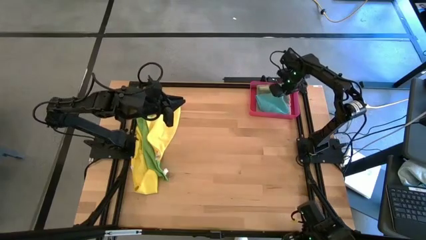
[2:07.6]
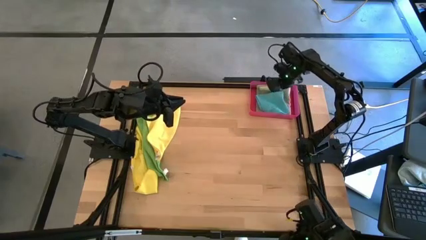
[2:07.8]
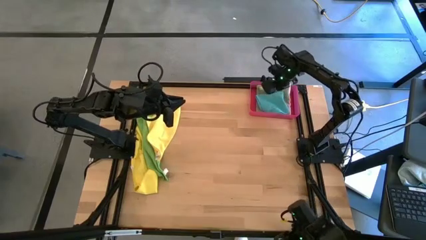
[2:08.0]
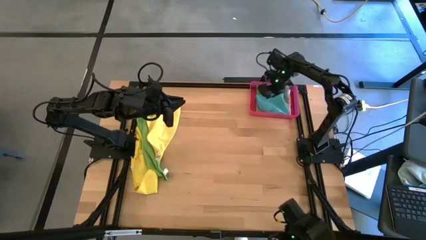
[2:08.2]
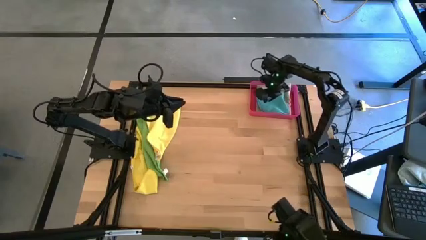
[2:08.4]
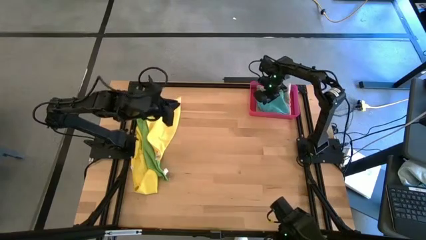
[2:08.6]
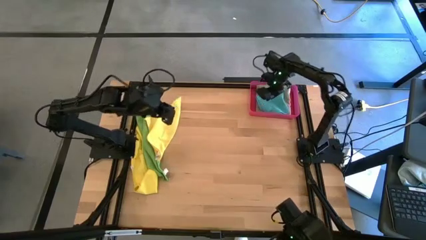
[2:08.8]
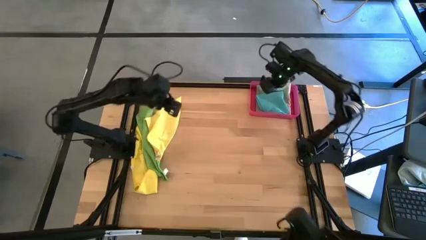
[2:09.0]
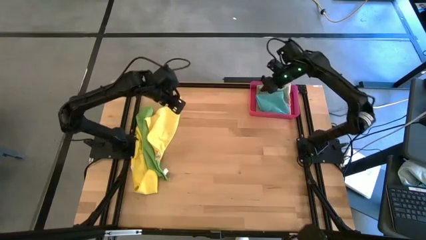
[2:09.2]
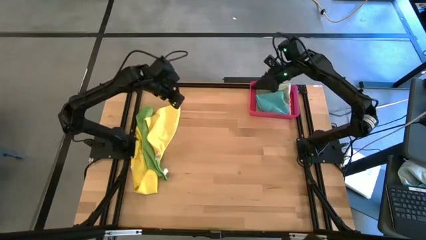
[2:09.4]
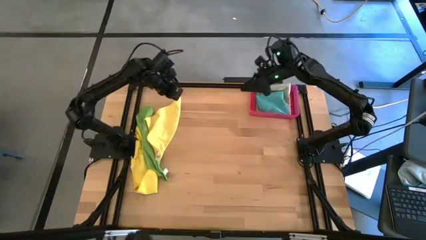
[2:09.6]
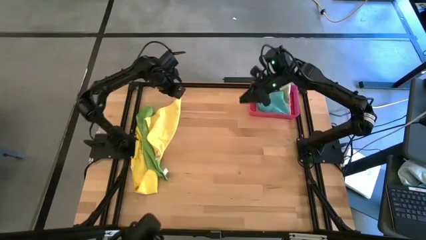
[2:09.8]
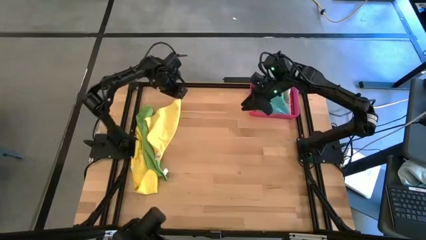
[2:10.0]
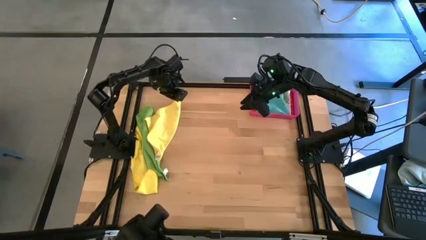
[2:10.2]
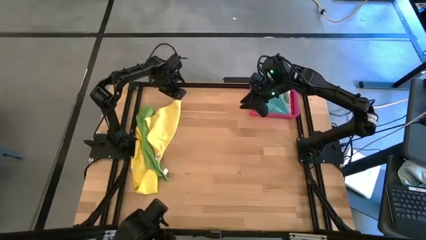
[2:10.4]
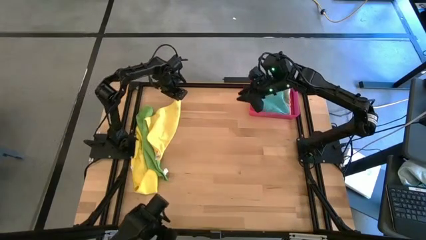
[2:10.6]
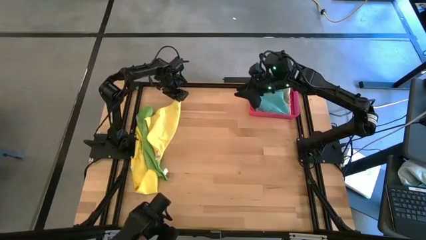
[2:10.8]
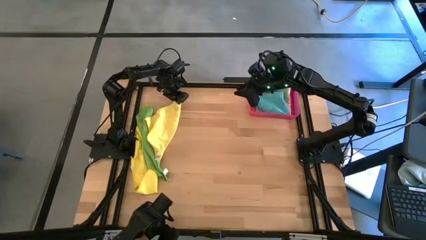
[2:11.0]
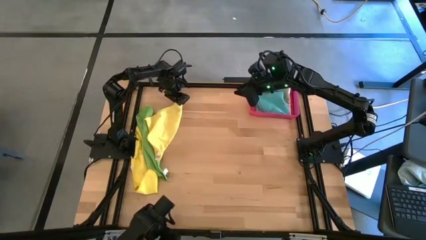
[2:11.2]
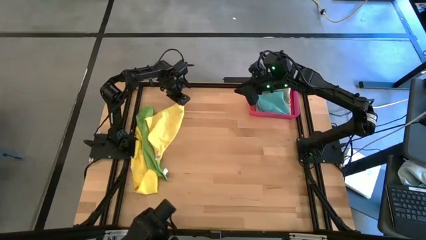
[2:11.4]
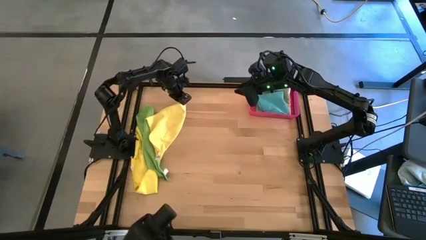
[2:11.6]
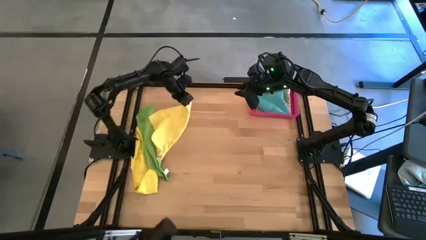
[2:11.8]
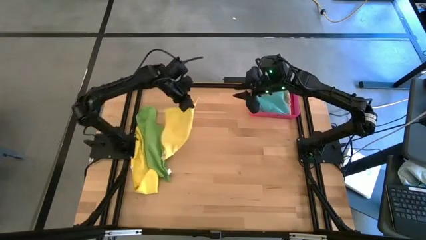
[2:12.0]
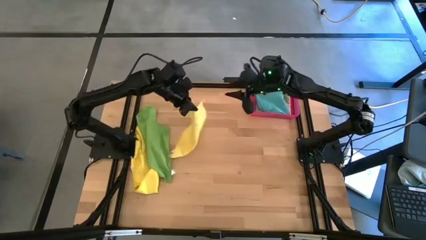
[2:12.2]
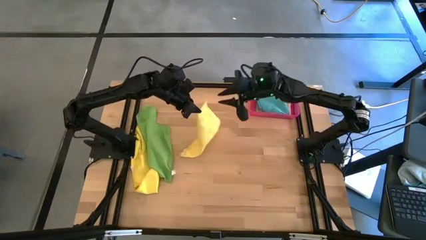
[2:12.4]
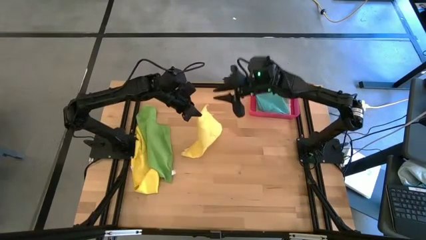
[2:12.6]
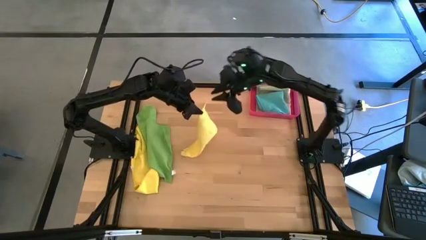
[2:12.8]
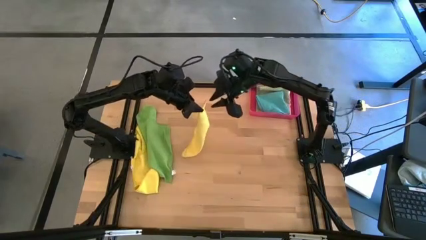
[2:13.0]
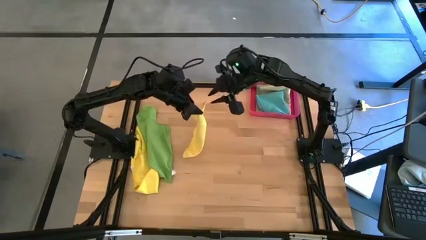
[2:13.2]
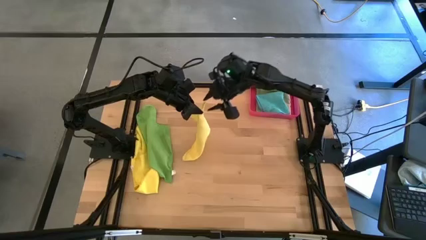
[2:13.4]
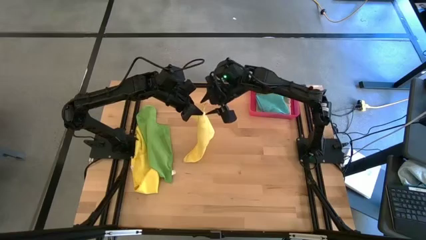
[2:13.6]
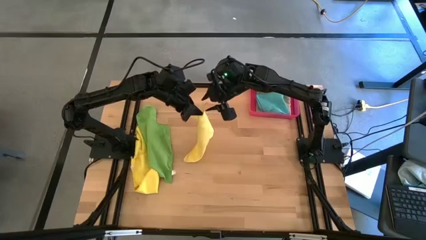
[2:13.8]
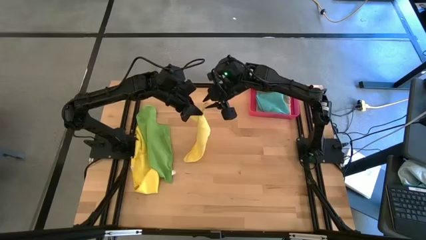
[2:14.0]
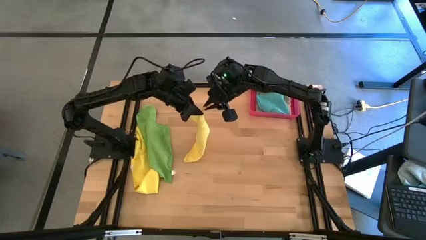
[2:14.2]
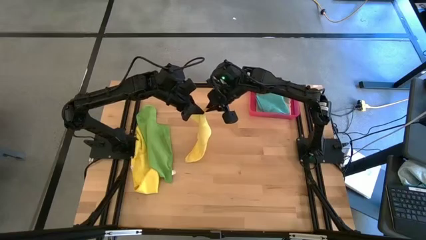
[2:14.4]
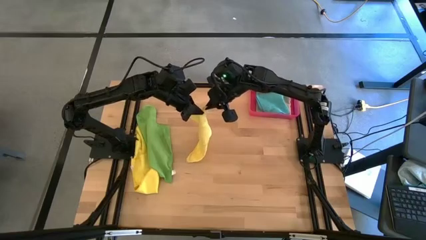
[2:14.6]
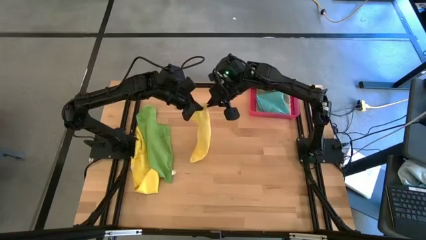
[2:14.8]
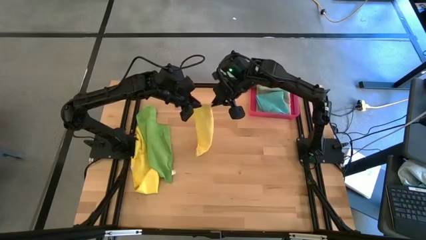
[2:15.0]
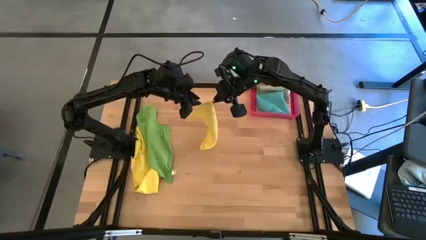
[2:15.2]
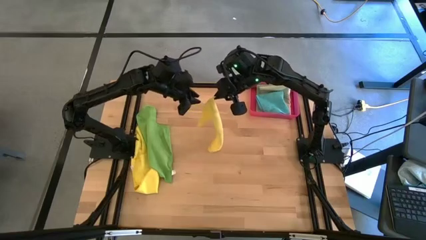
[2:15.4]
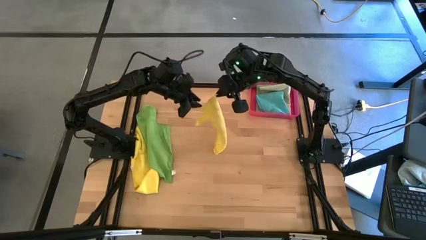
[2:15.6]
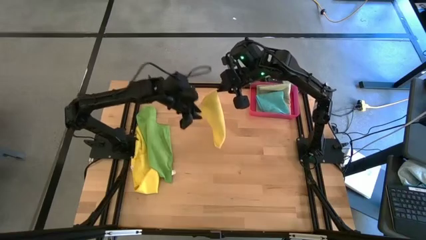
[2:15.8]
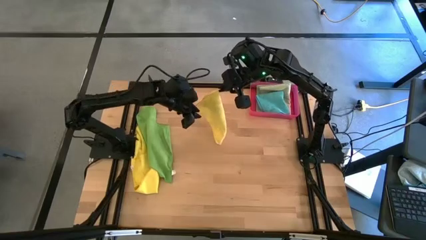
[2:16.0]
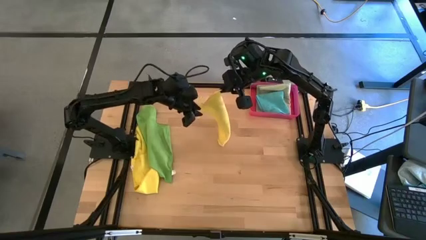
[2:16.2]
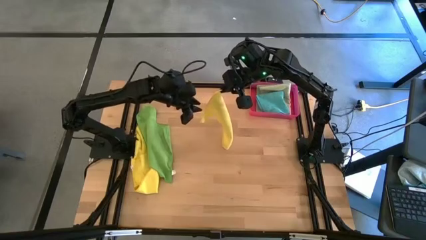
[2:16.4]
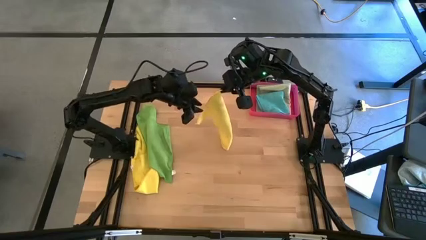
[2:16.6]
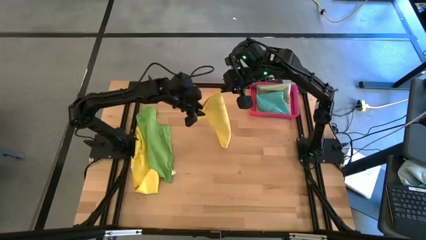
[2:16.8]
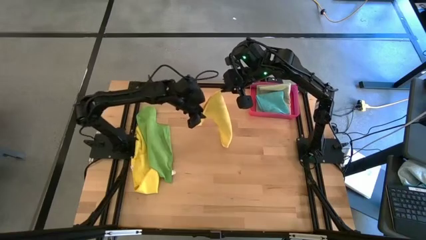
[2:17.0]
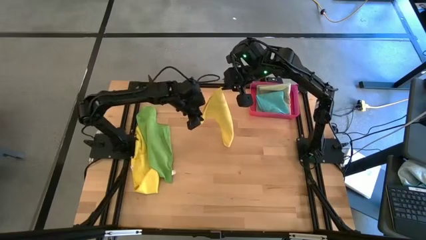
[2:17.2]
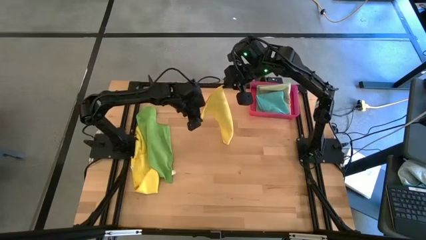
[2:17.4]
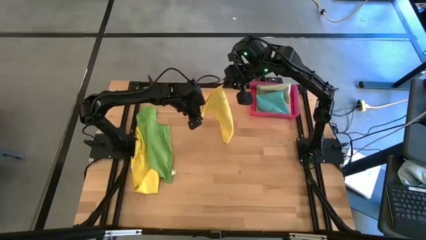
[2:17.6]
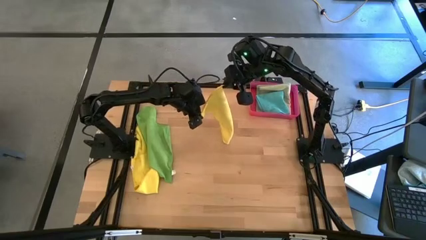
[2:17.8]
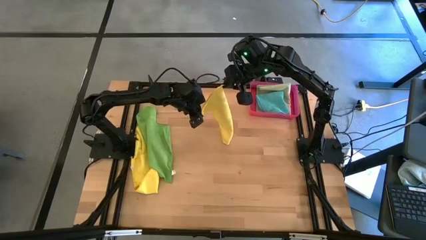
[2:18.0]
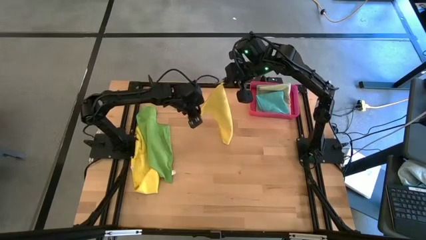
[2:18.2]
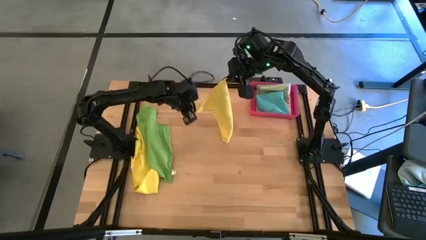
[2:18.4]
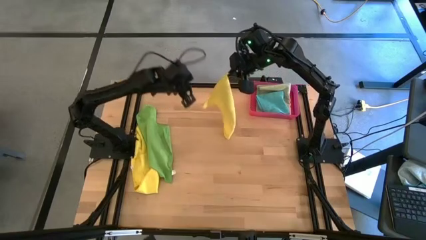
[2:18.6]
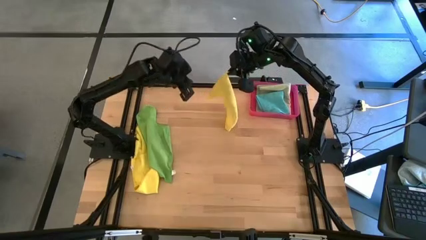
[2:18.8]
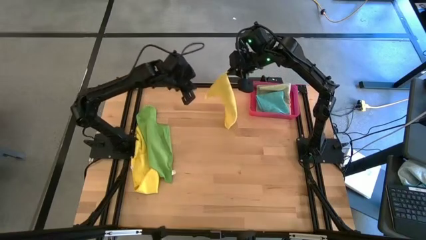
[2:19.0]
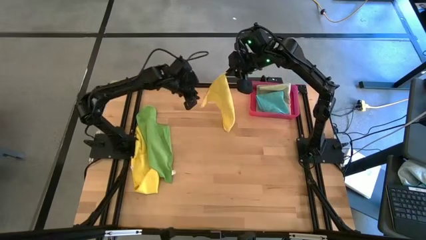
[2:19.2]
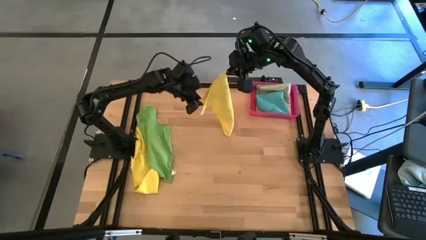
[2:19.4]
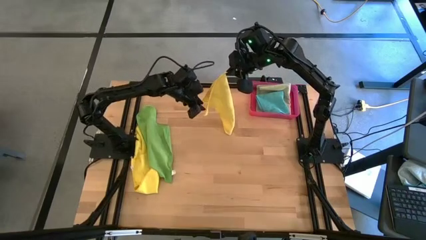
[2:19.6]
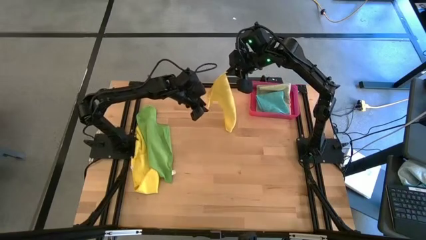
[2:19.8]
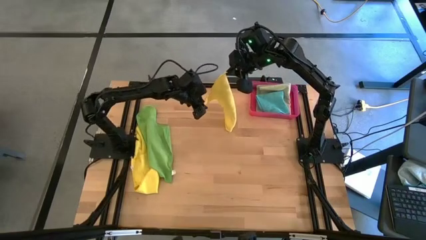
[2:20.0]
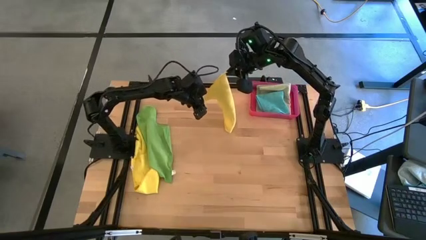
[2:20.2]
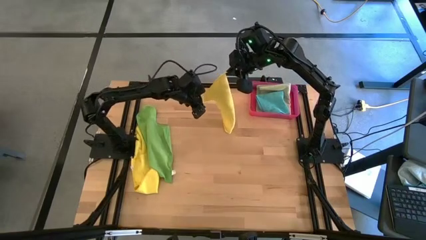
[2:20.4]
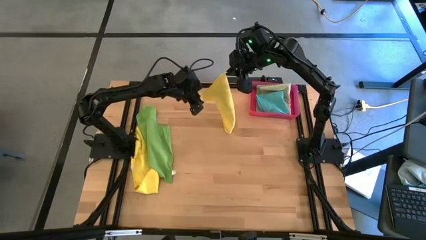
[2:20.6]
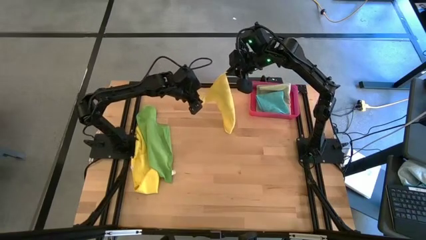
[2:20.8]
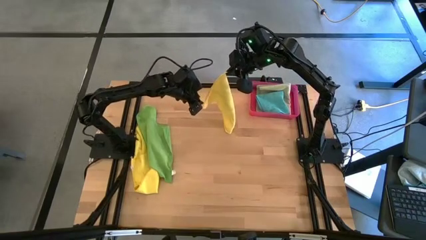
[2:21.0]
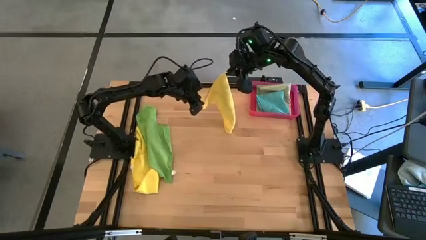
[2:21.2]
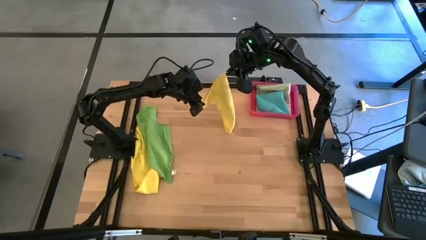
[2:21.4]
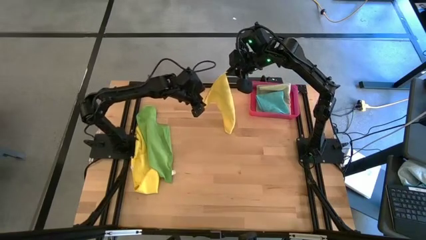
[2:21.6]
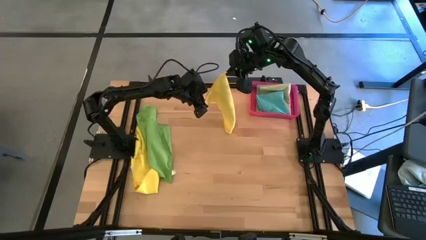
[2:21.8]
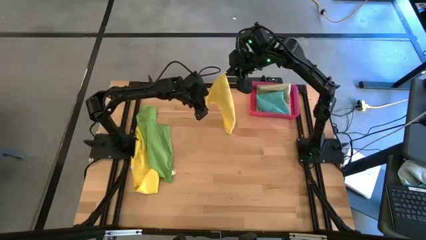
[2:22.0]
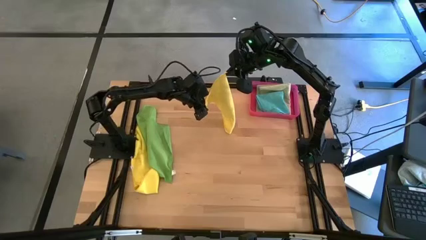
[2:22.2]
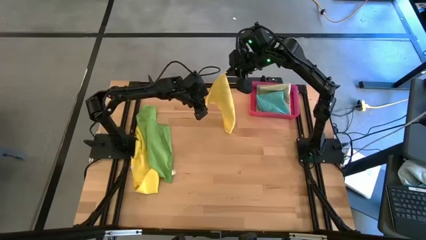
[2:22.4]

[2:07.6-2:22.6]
Task: Fold microfiber towels
Fold the right yellow towel

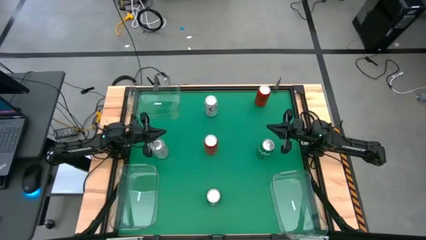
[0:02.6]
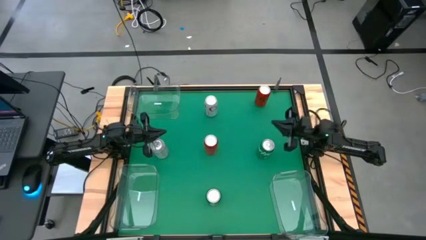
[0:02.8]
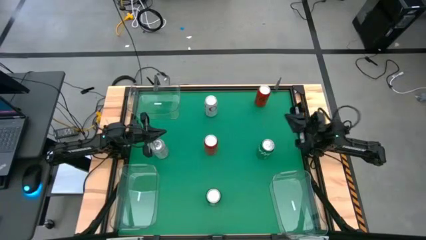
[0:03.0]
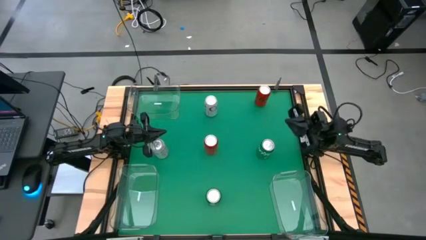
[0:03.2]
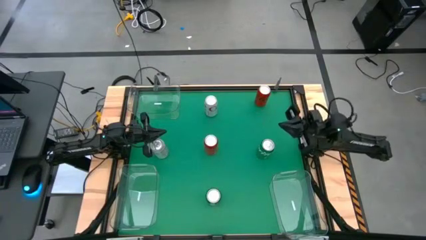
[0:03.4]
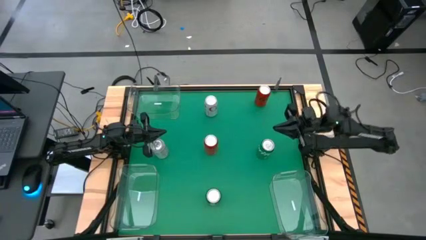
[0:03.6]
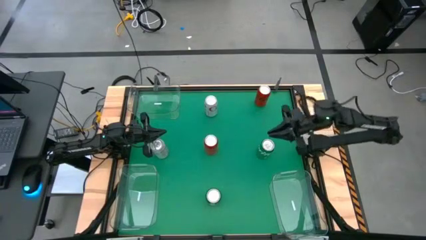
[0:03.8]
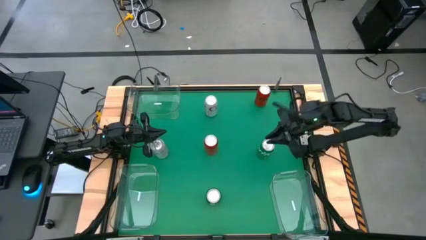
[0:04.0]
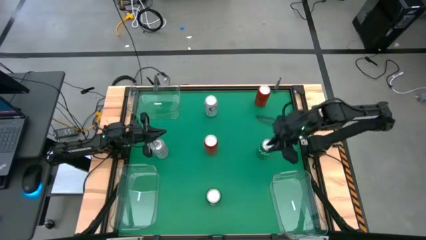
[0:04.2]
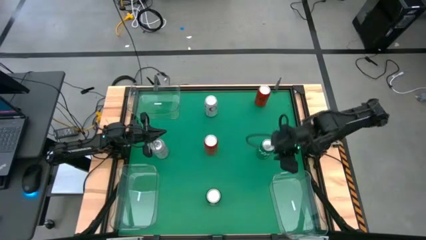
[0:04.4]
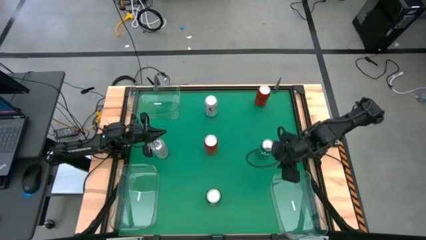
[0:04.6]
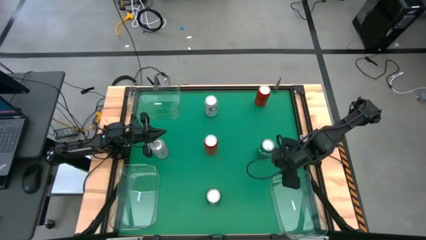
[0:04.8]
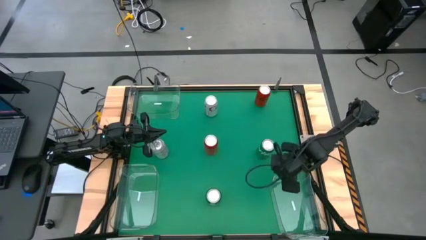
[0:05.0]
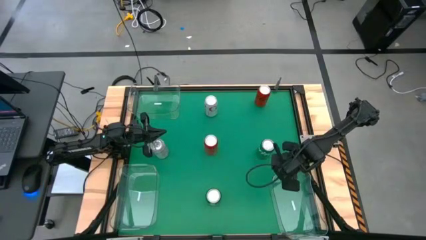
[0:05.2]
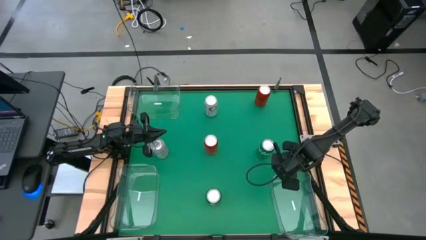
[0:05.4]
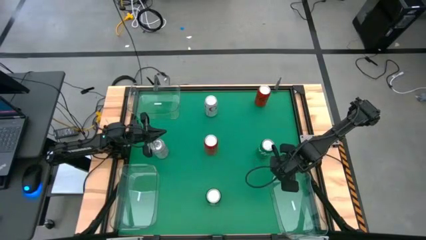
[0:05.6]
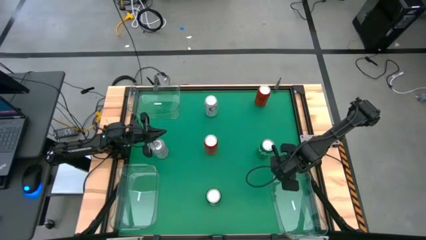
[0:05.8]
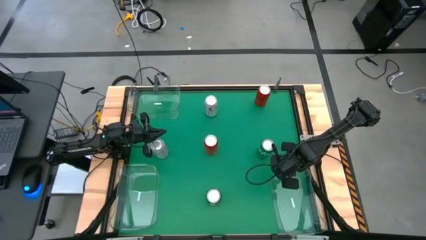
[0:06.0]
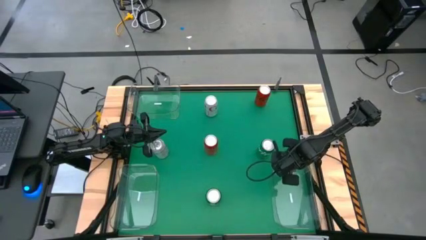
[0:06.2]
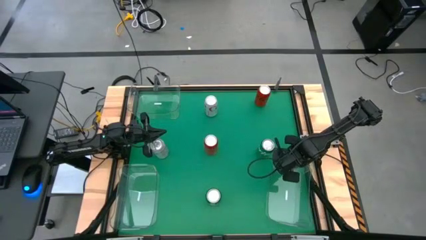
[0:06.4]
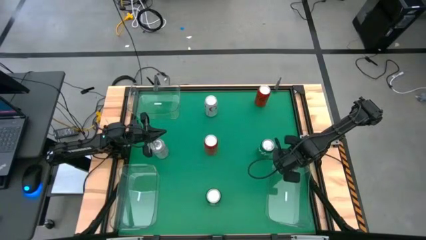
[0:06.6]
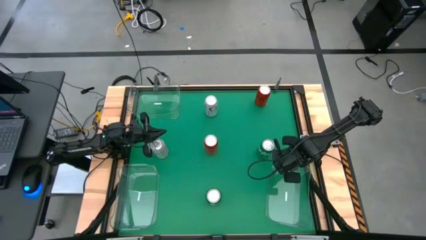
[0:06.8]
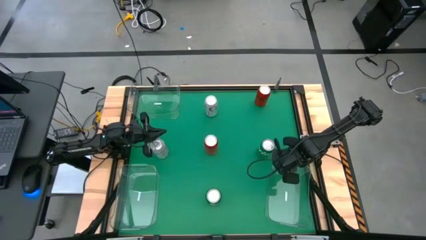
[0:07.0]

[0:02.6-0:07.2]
Task: Sort soda cans
Prepare the bottom right transparent bin
